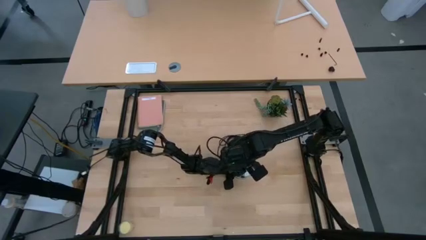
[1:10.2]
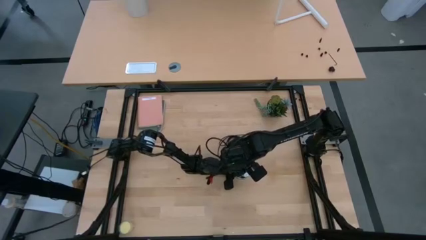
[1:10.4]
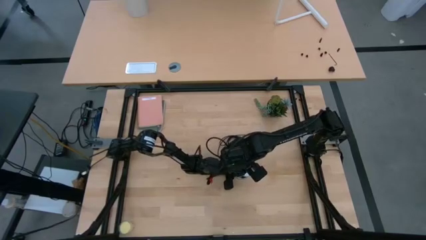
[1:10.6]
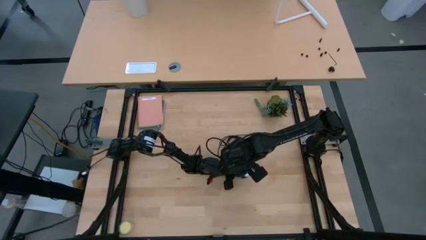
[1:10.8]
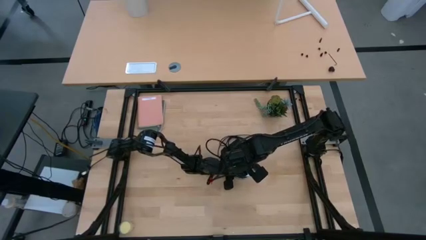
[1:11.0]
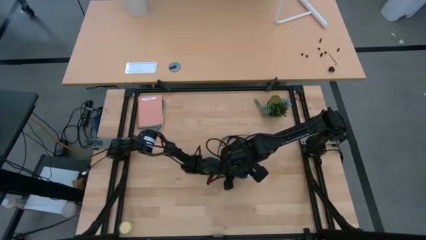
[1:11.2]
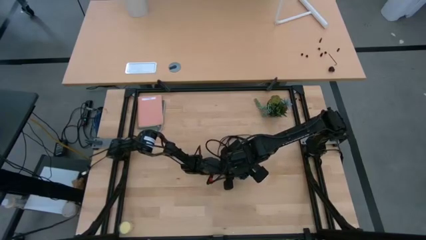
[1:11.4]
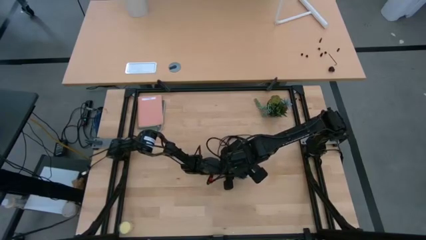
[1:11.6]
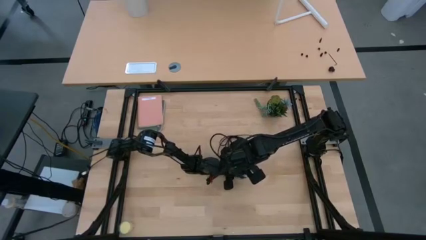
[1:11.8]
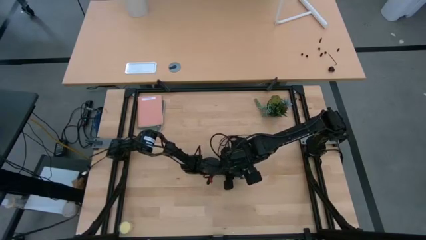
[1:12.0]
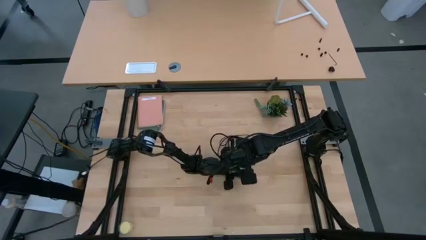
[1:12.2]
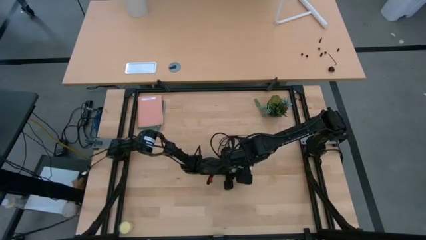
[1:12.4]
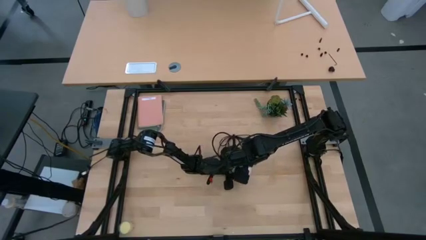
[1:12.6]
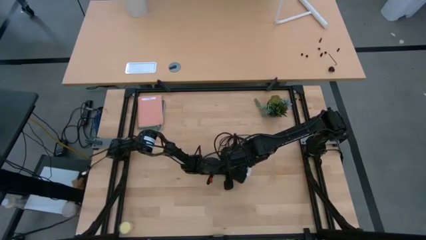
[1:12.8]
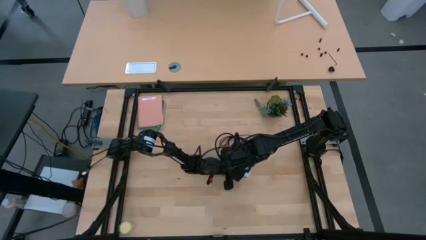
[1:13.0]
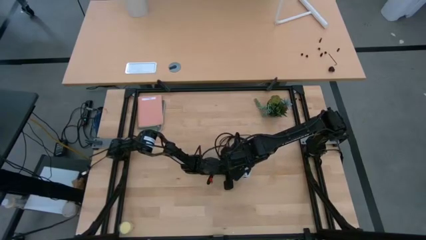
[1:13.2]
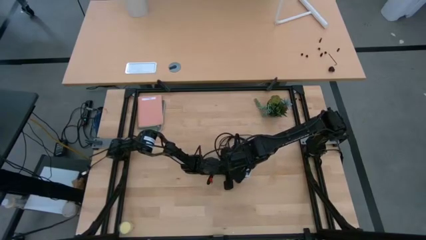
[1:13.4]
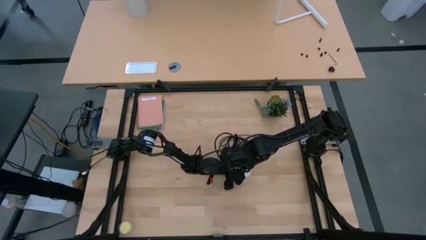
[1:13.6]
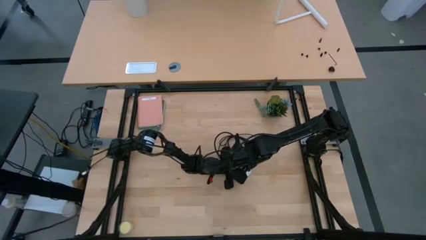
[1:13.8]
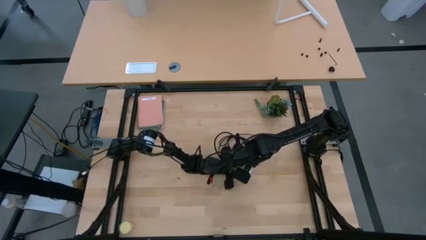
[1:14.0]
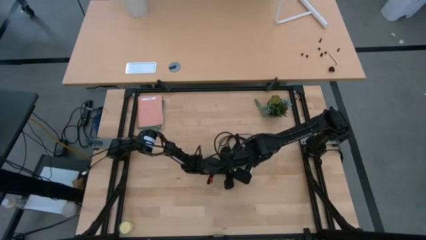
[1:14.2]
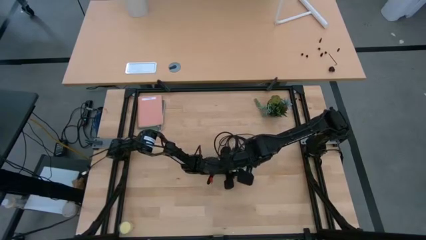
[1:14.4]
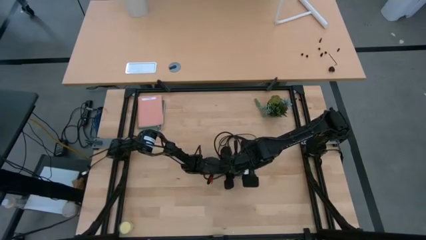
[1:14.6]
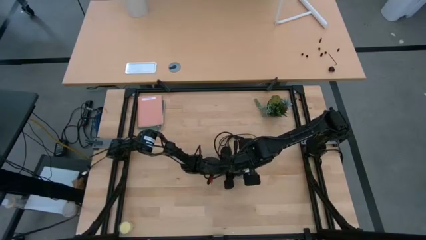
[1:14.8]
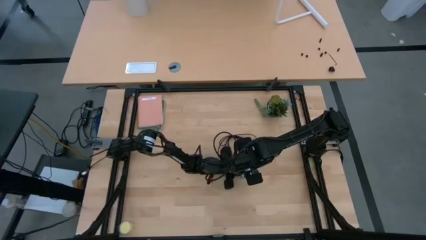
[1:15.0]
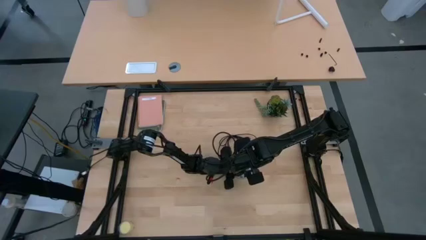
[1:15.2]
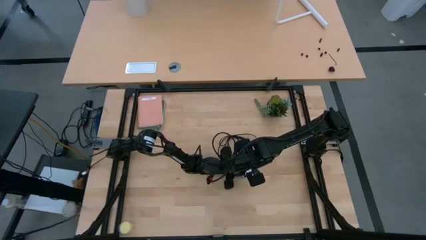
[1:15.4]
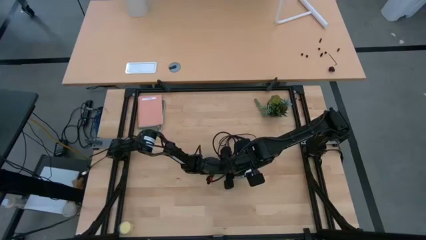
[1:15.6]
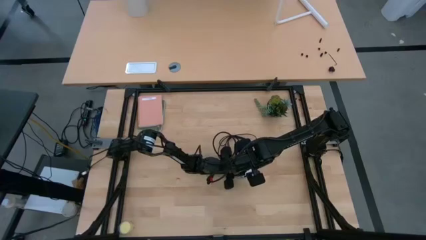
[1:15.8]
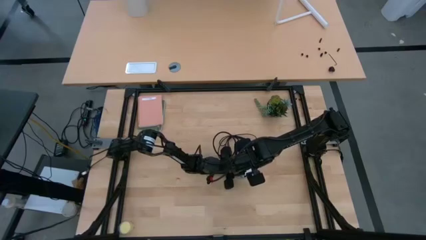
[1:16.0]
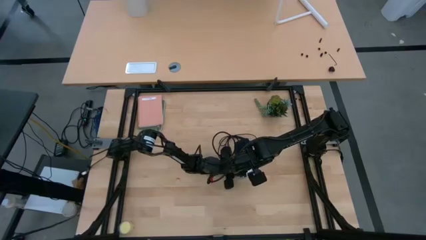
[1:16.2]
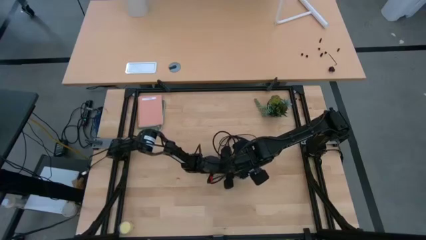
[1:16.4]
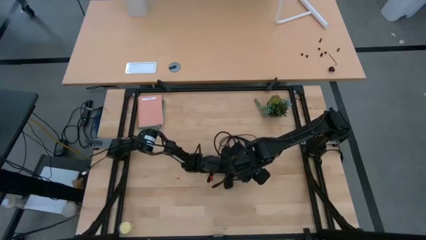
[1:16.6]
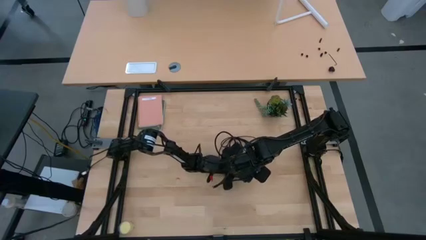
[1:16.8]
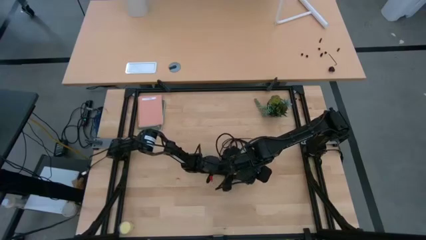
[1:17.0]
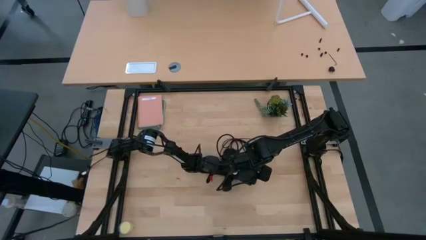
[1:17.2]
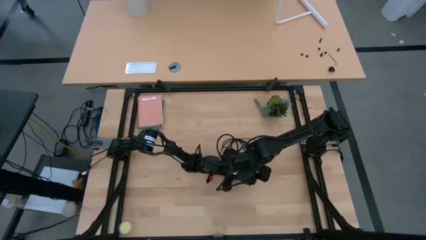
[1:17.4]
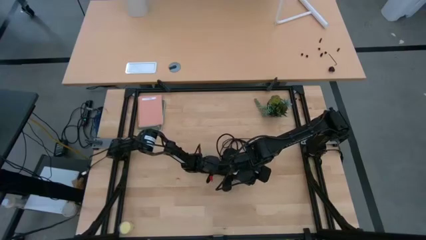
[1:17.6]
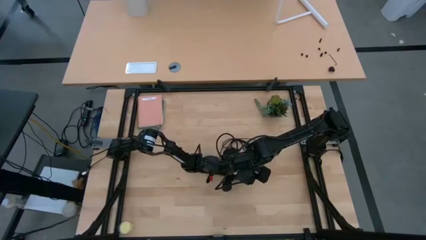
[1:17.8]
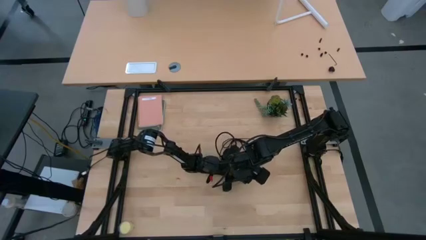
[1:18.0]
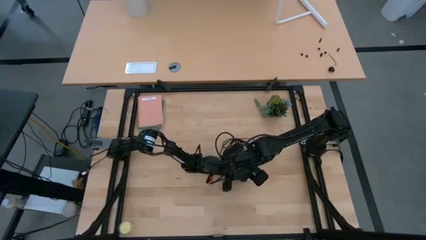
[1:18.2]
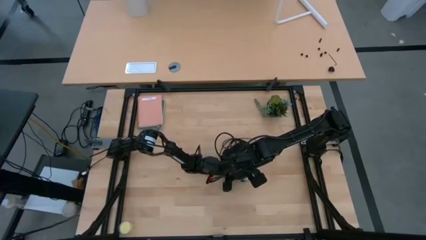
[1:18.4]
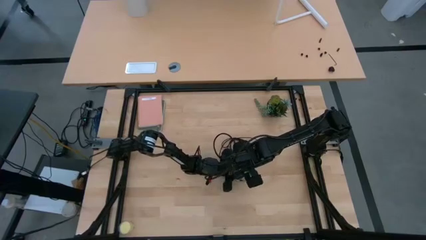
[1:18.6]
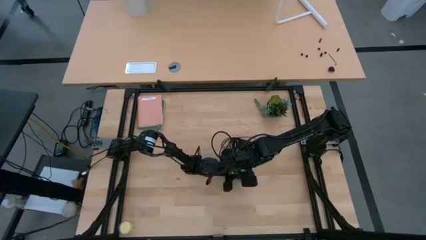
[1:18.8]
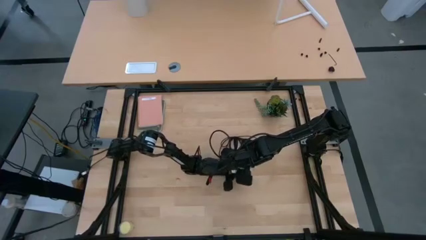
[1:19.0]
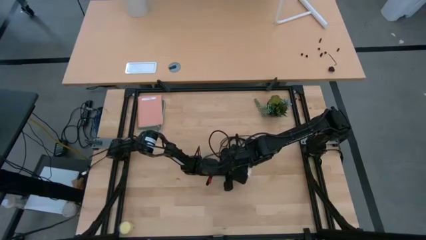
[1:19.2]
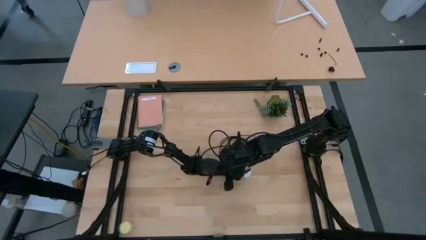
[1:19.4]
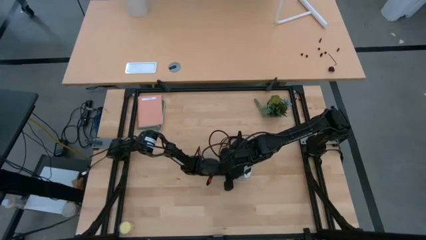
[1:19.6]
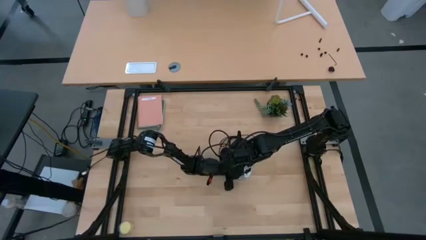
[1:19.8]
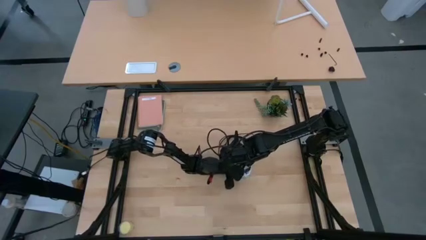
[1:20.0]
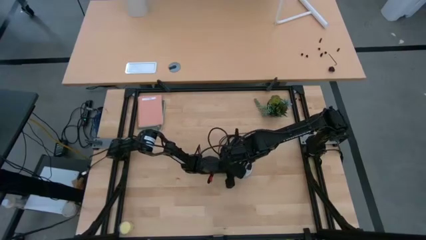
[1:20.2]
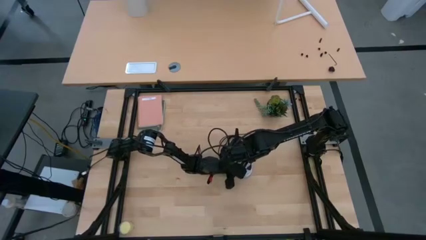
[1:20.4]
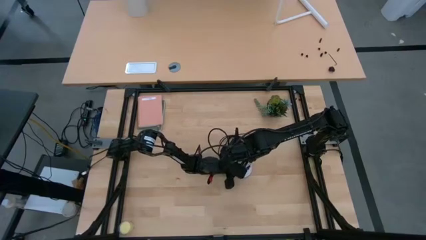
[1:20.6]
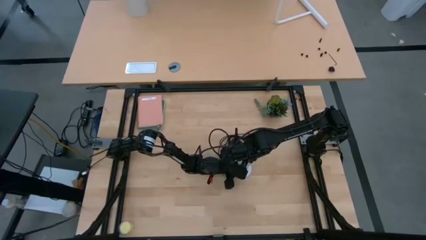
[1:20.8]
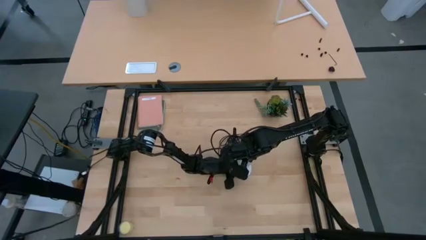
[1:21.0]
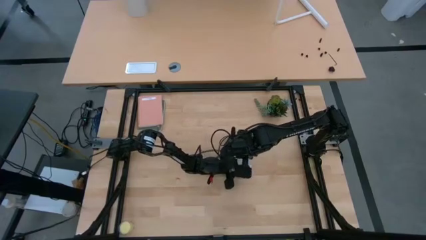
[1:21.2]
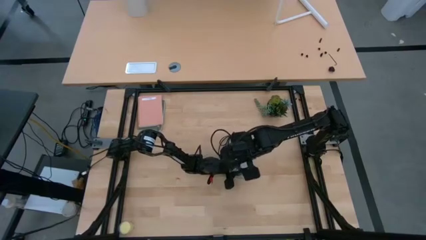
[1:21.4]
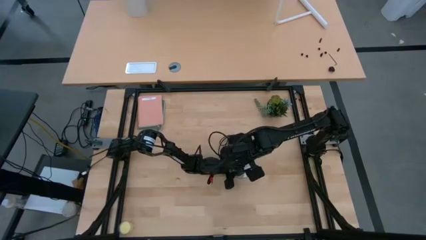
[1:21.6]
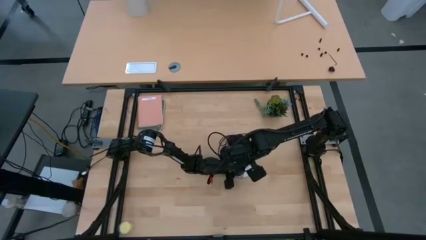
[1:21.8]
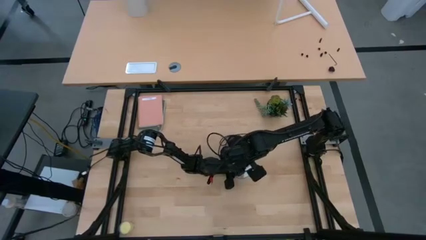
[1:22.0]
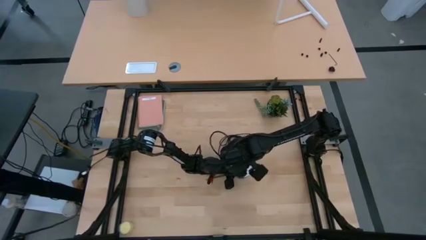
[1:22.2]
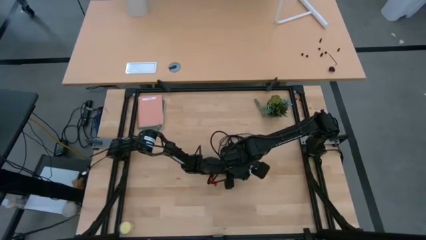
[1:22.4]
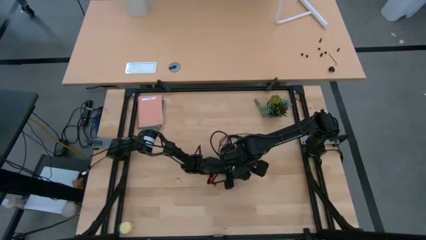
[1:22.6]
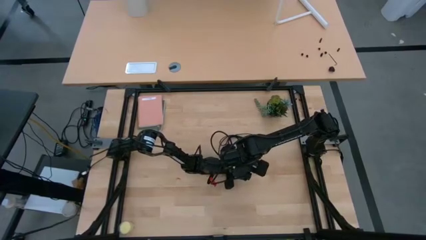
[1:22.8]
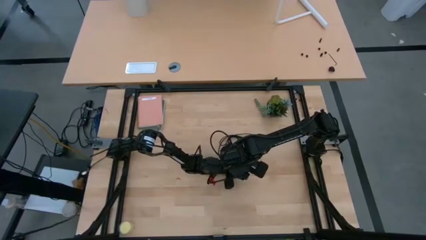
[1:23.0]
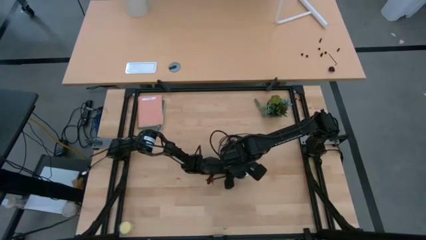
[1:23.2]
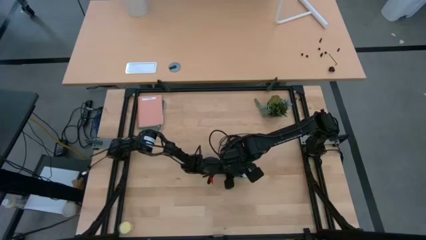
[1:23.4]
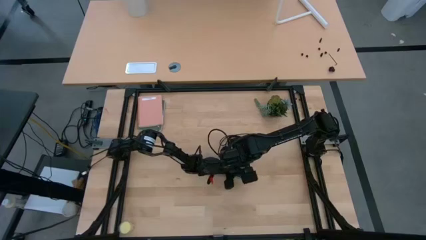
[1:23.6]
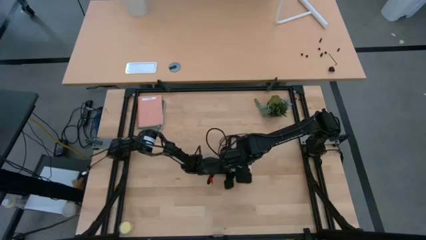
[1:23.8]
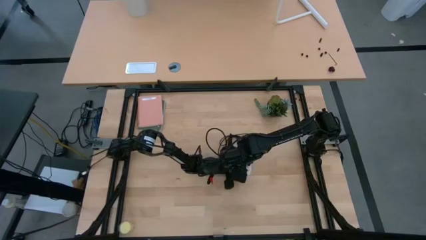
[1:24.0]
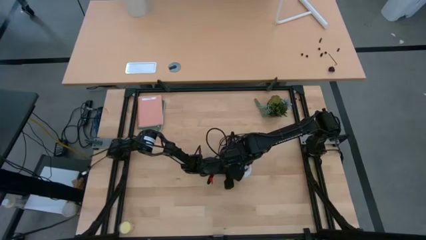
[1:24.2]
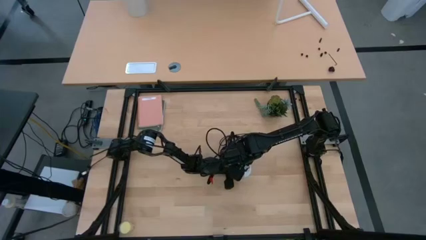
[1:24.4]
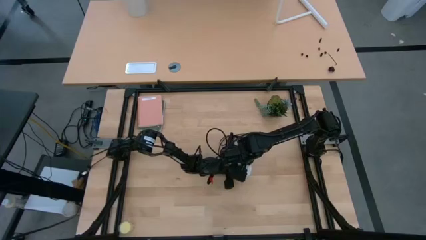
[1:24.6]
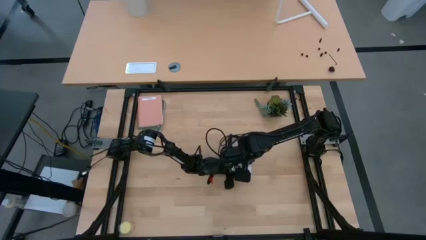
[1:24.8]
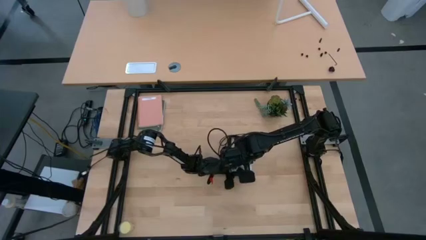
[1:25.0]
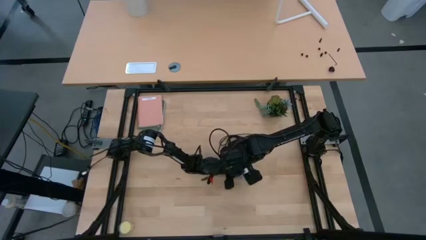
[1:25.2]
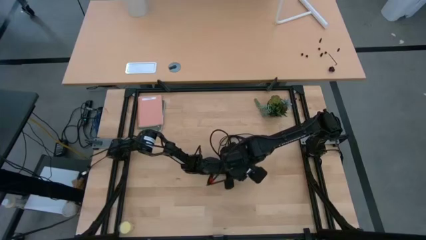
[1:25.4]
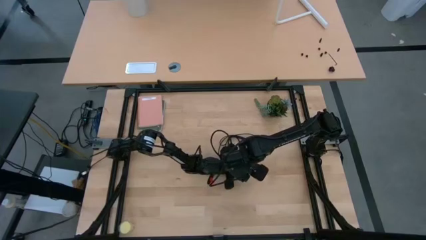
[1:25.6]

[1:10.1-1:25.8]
Task: Screw lightbulb
Insert the white lightbulb into the silver lamp
